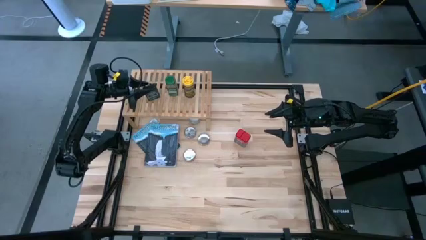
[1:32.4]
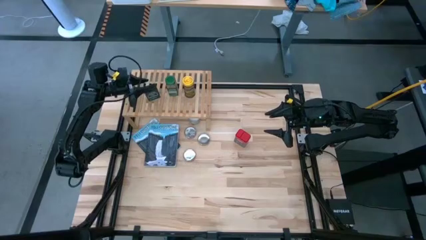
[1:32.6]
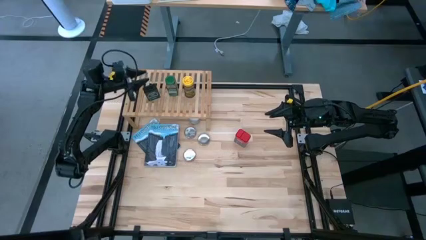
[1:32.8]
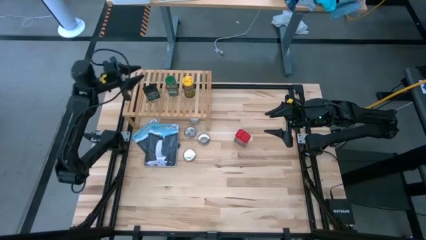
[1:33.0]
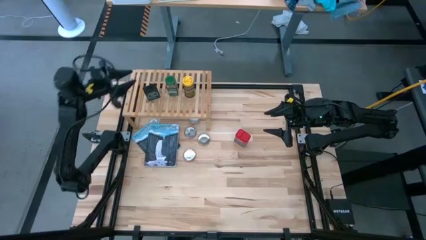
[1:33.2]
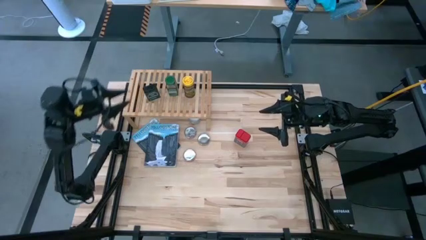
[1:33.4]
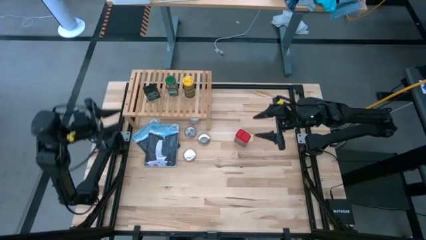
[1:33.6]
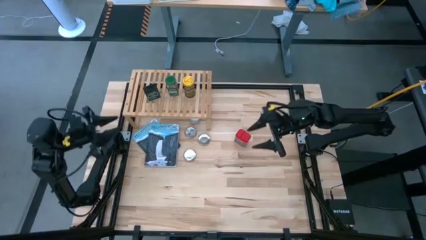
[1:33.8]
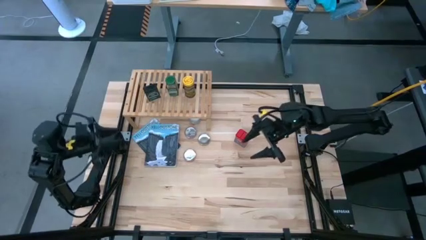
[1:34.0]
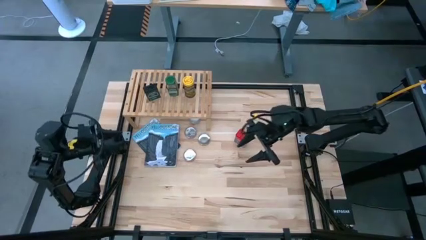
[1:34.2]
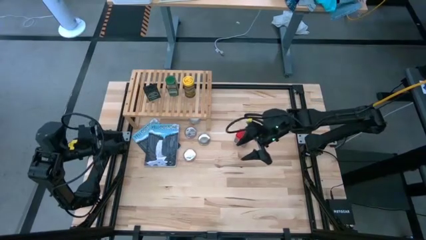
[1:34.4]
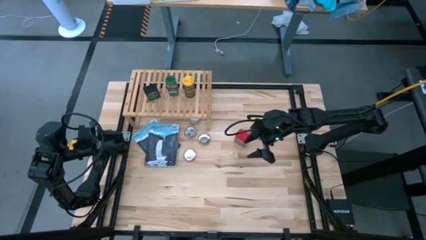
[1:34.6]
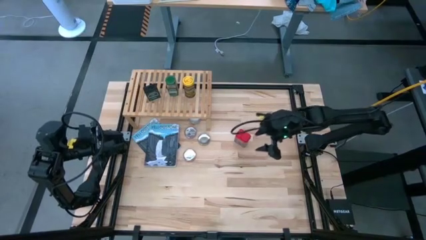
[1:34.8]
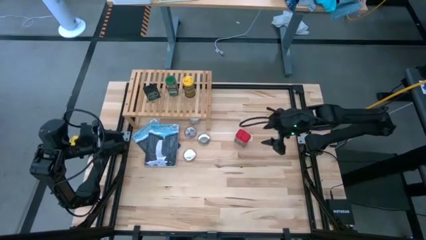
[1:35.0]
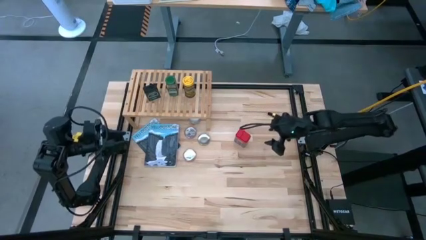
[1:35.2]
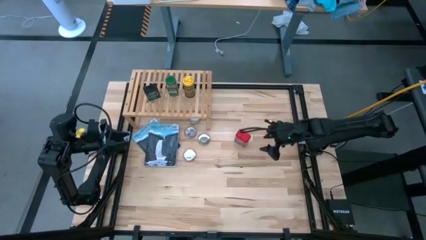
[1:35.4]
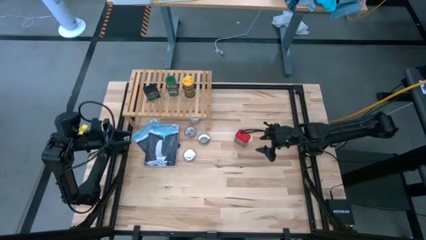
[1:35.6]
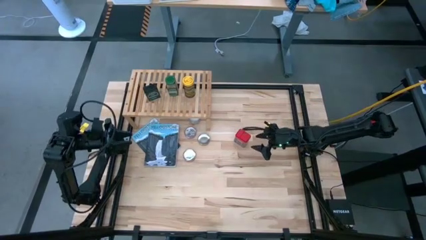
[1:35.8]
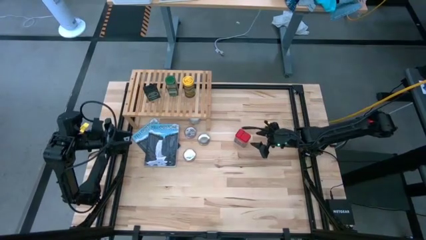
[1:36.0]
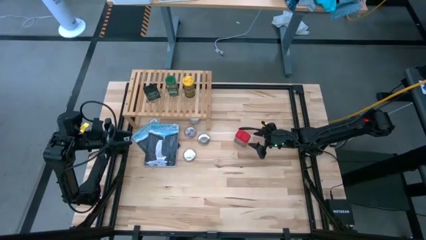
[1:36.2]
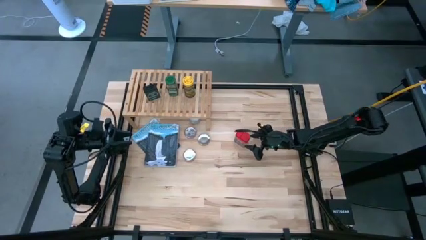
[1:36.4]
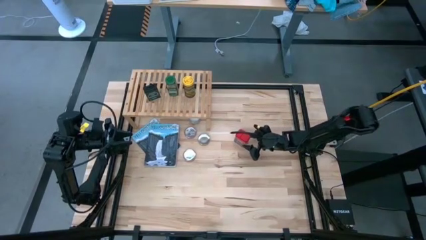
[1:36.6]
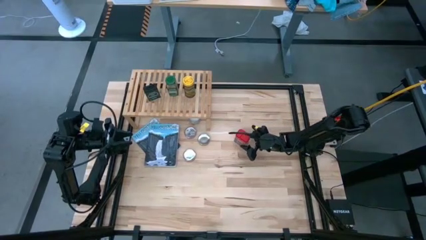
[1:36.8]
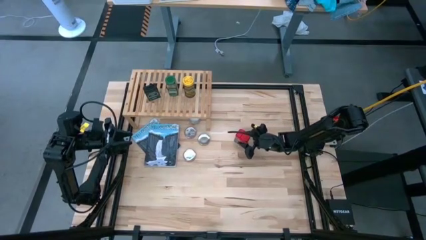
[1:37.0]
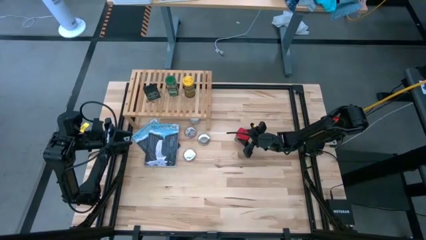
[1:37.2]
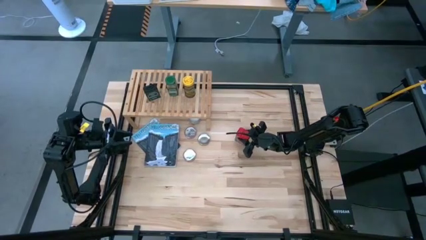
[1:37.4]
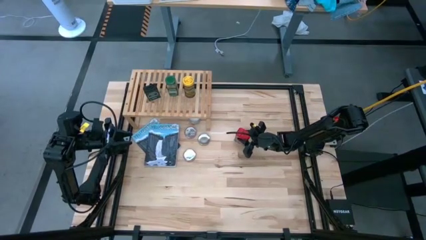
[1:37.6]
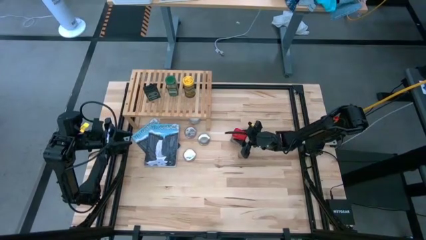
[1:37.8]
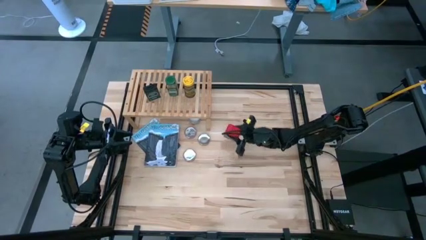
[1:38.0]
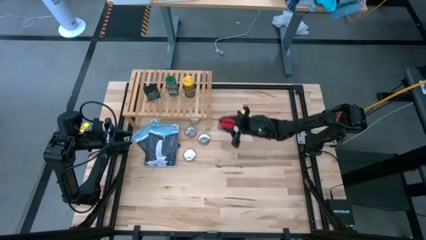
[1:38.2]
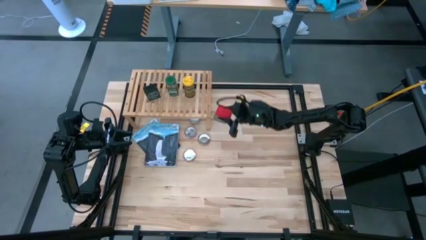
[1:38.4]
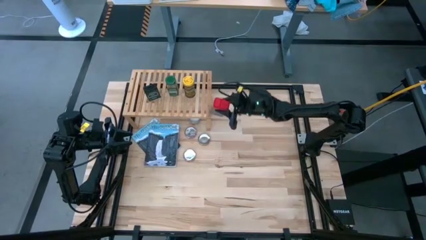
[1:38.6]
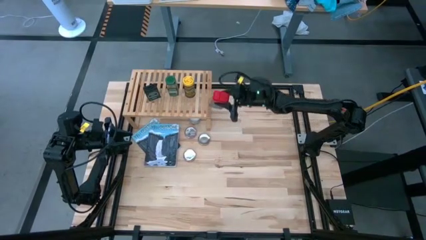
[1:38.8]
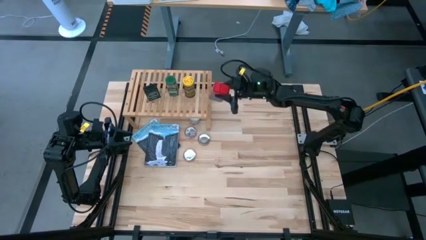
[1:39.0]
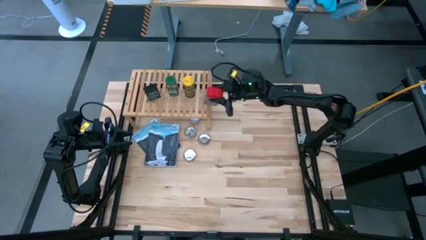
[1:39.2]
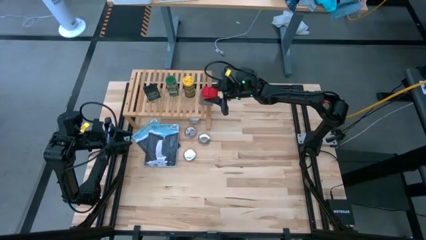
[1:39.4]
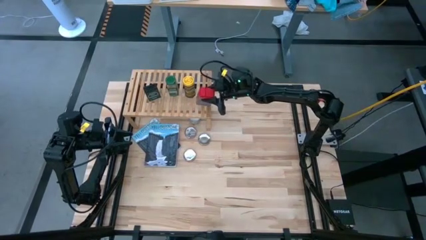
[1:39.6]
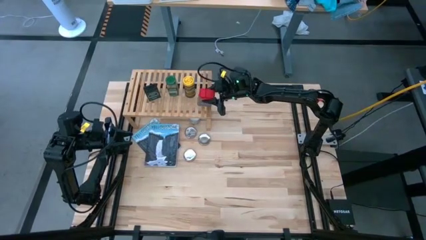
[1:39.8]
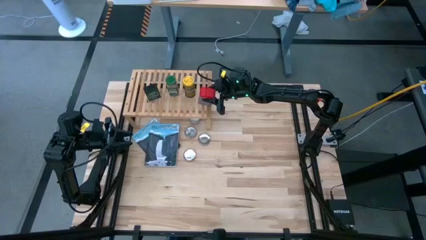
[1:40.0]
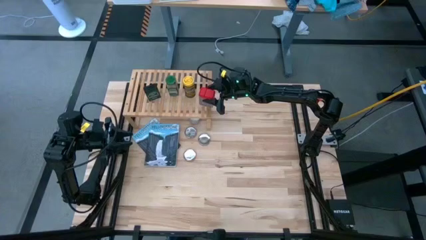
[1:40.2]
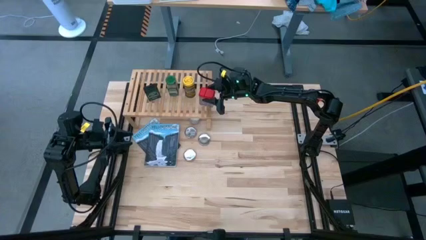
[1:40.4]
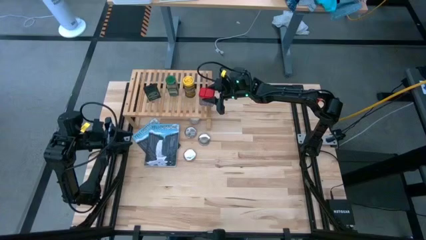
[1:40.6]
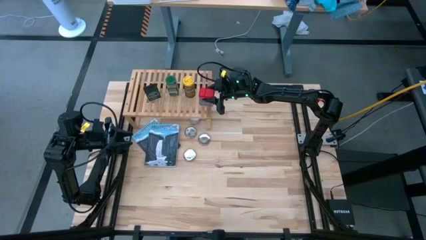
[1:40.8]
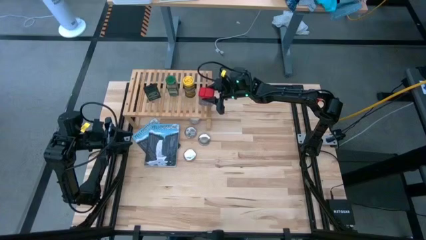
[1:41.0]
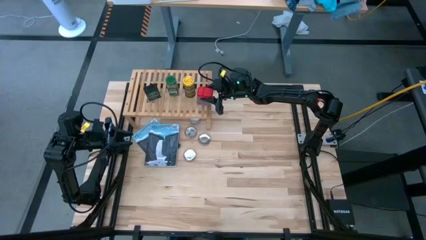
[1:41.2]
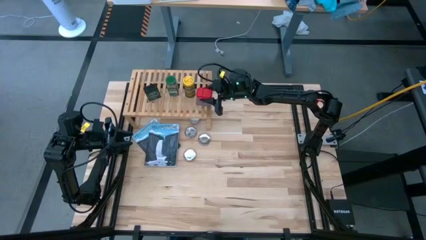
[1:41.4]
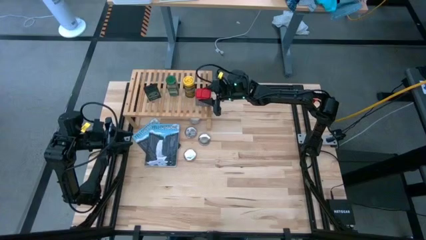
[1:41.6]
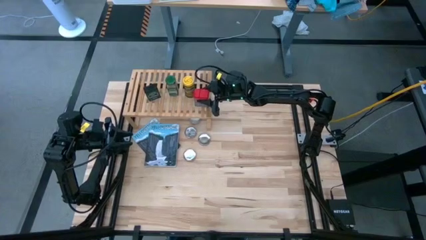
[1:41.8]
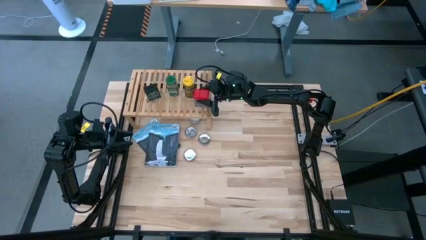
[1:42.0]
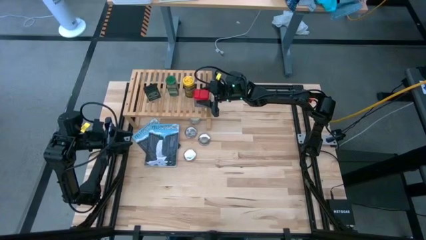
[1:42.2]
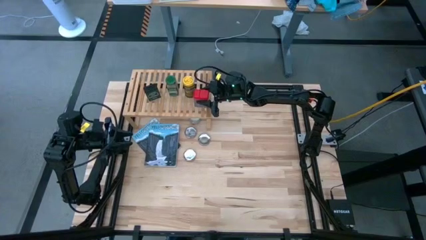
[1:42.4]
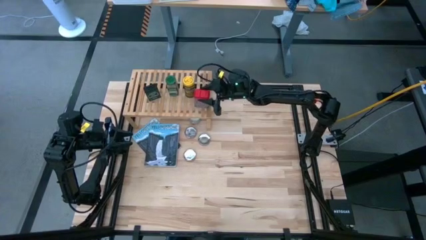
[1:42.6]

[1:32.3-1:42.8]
Task: Shelf spices
Put the red seasoning can on the shelf

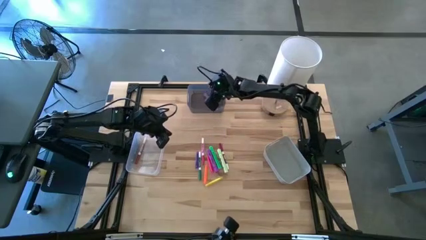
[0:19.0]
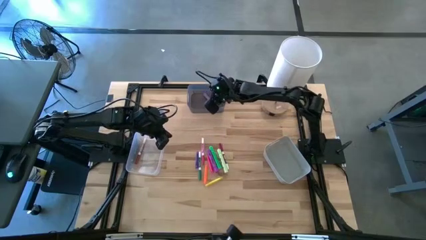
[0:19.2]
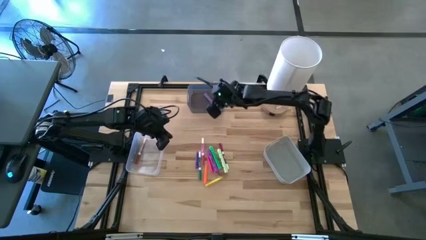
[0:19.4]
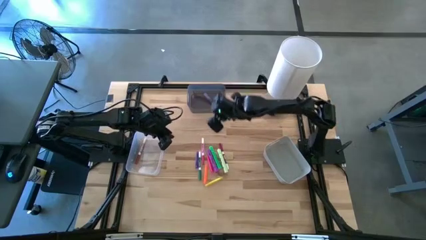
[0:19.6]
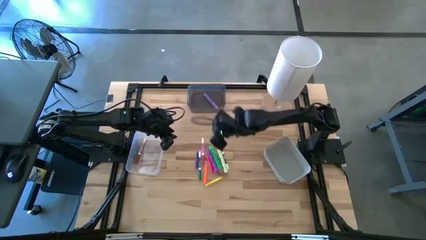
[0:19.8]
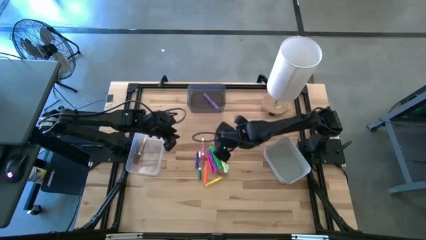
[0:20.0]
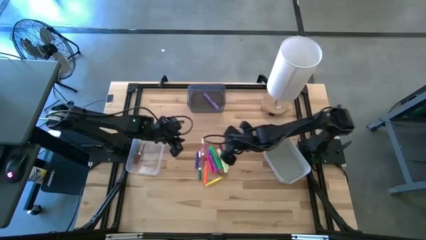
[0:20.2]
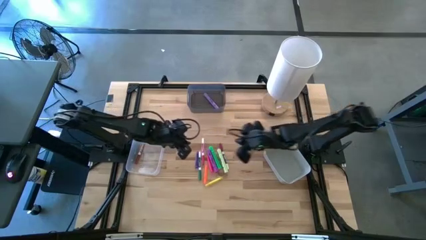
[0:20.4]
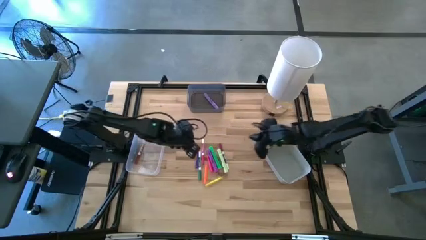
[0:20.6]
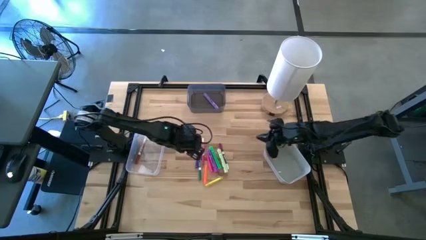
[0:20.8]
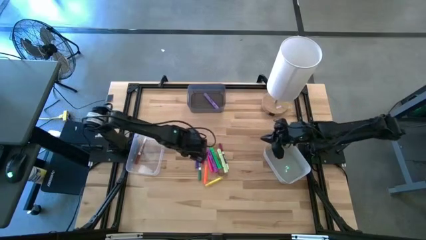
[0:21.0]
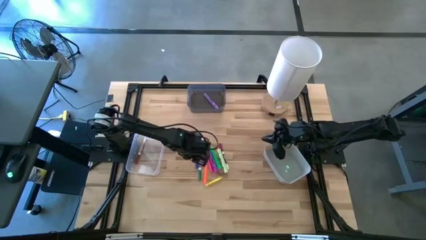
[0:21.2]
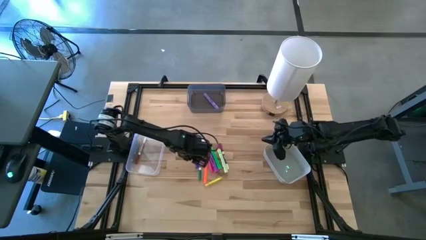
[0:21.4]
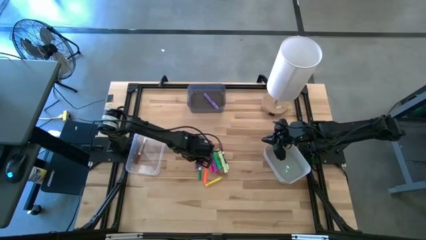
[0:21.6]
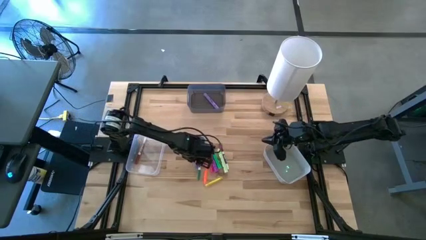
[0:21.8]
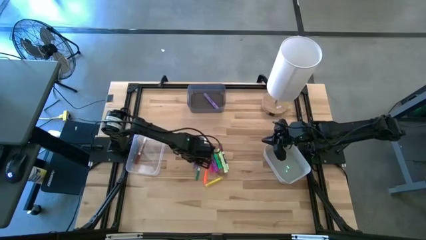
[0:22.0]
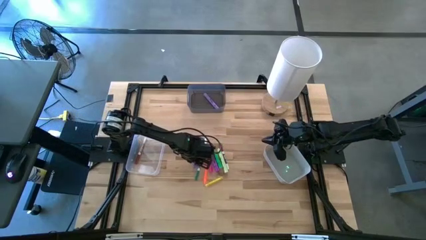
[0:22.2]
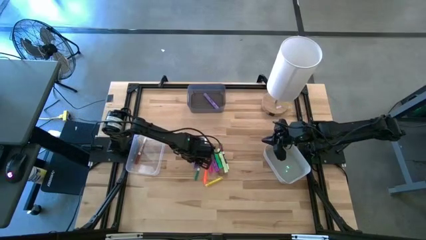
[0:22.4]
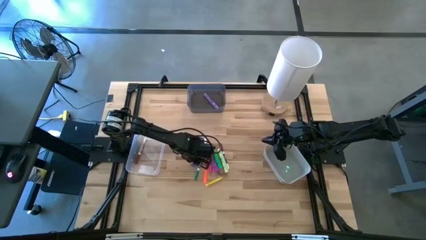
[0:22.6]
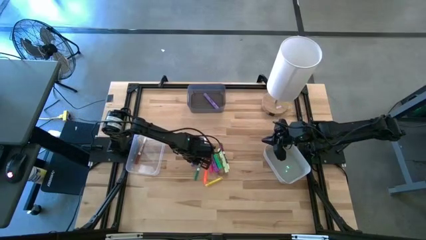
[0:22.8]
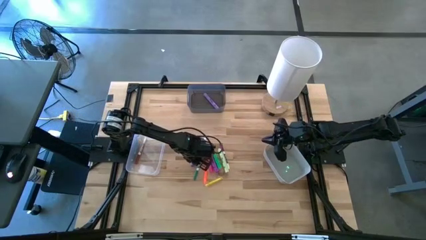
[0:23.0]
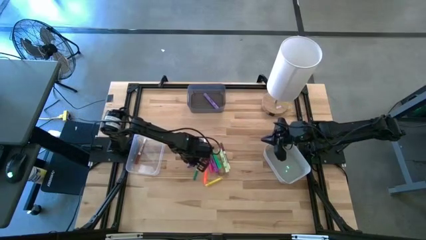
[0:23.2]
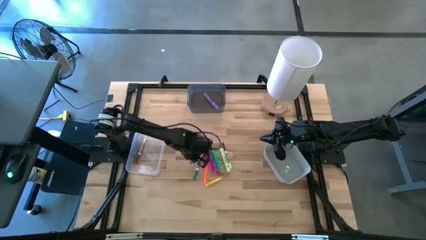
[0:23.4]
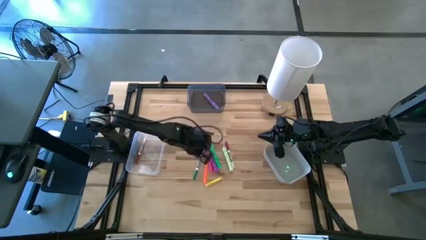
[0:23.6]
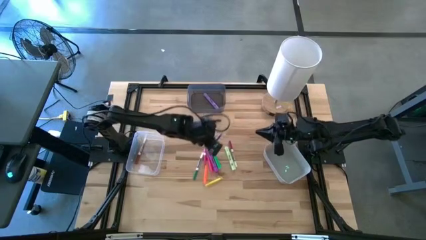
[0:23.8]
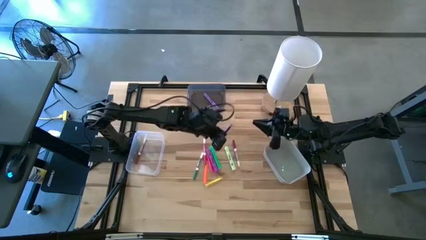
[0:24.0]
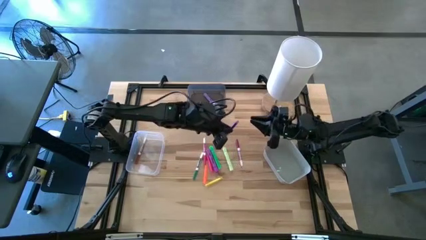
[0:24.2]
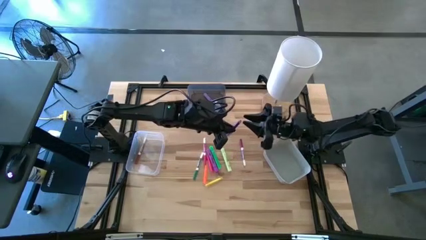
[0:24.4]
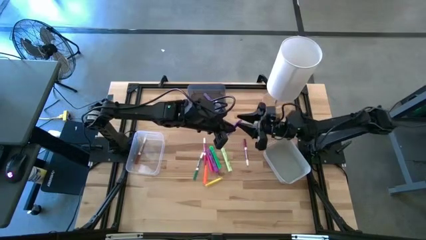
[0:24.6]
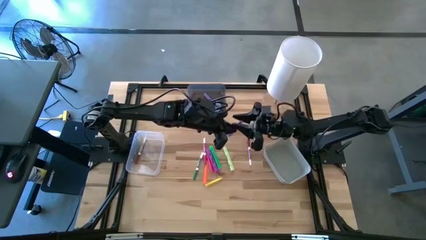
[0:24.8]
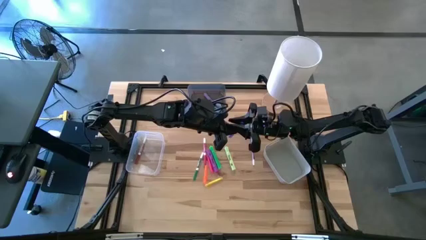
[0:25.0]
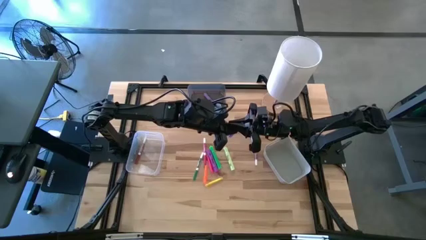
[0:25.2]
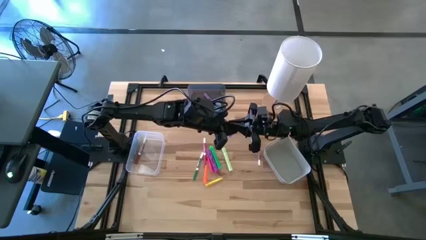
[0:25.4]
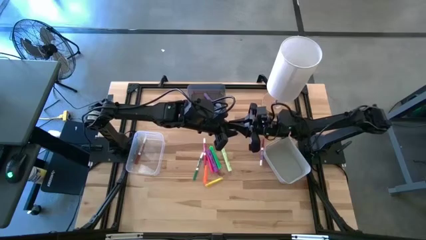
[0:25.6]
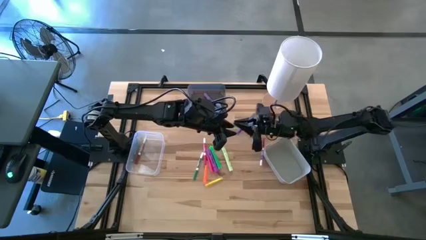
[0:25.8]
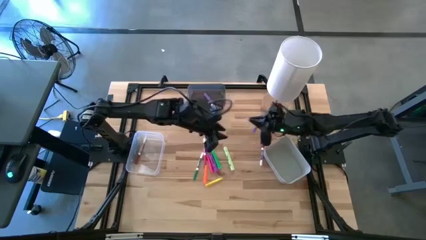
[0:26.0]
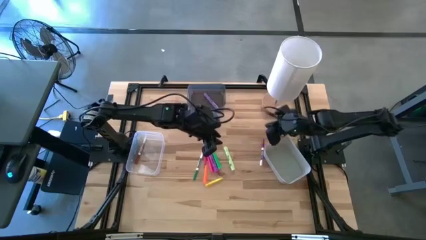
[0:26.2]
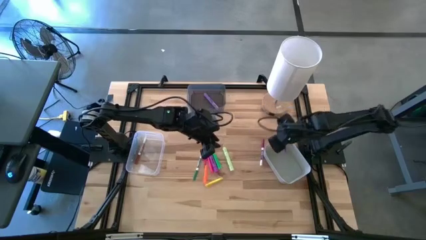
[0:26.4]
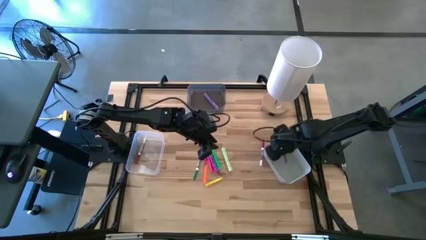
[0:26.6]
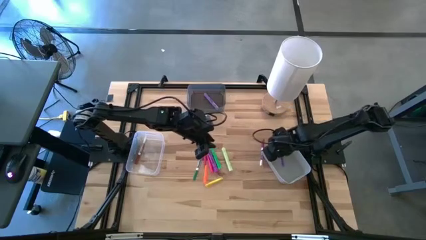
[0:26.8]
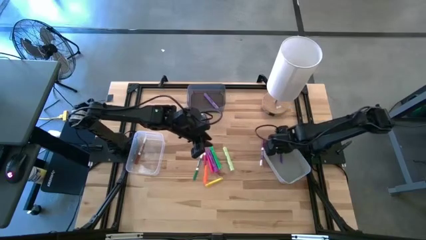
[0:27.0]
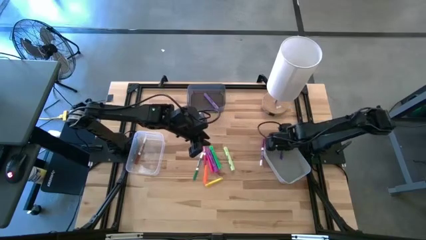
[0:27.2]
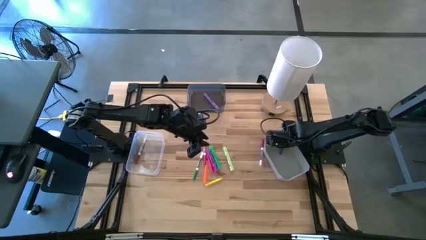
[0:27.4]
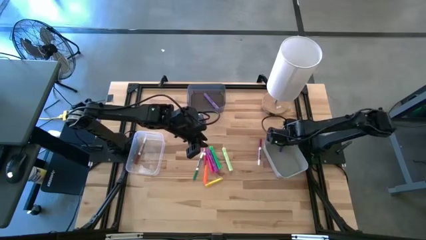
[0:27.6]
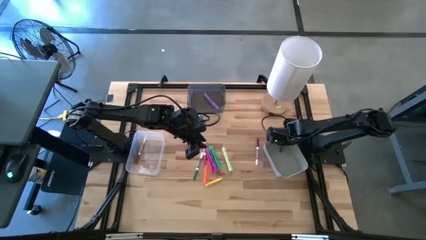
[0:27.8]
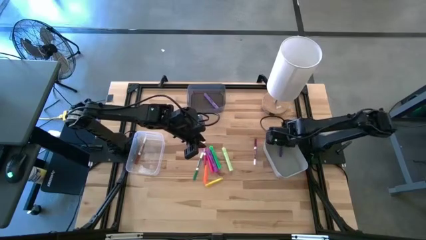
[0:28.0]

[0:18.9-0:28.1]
Task: Pick & Place Markers
Put the blue pen into the gray bin
